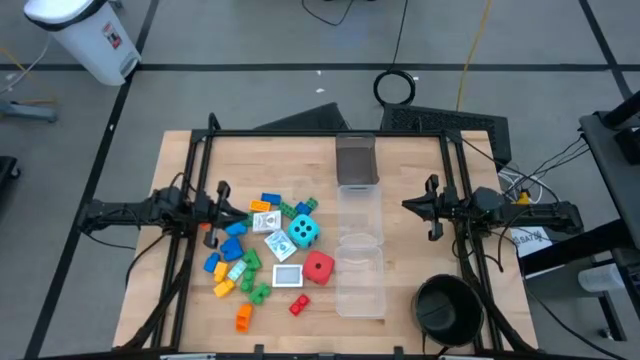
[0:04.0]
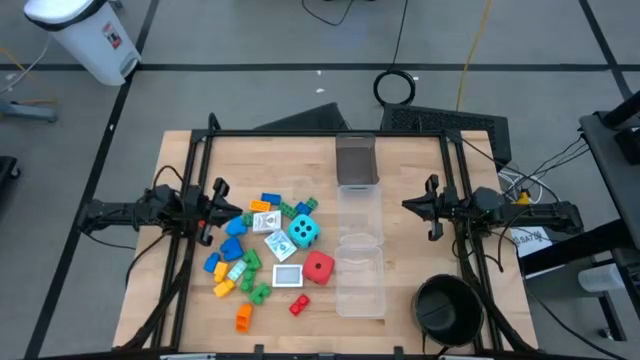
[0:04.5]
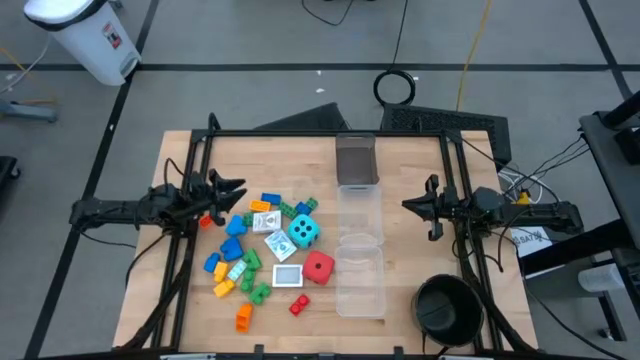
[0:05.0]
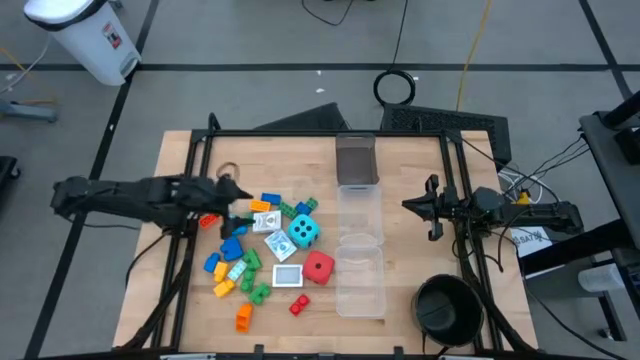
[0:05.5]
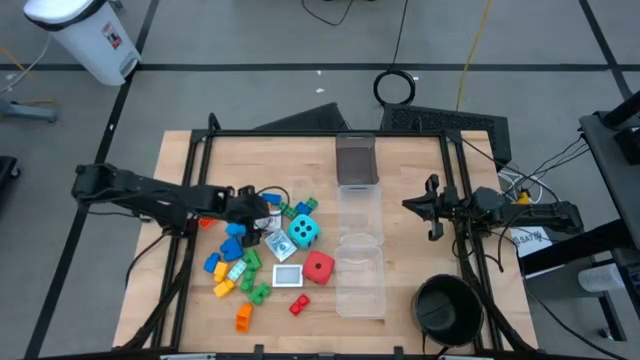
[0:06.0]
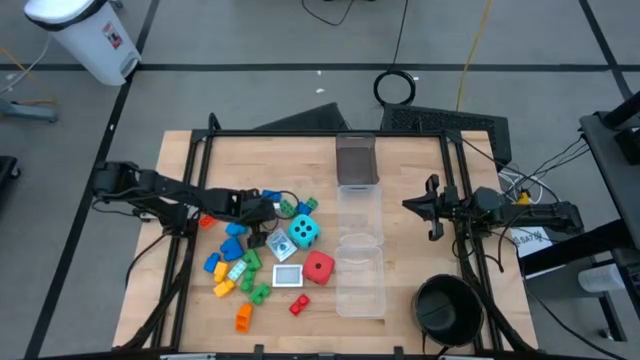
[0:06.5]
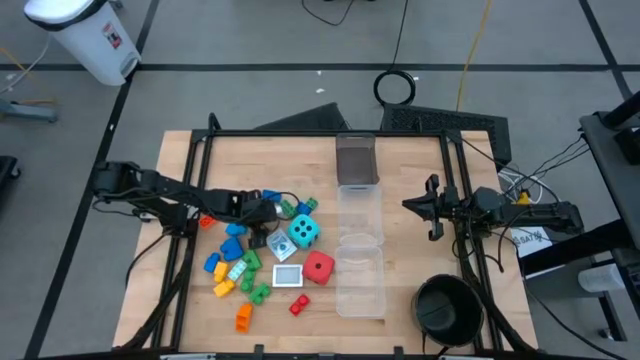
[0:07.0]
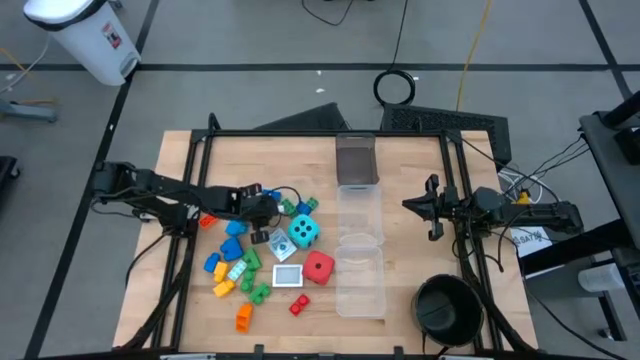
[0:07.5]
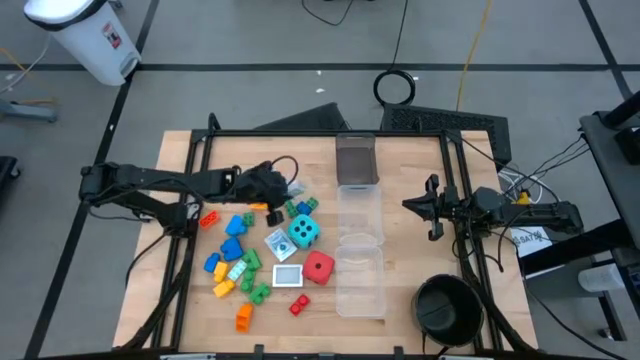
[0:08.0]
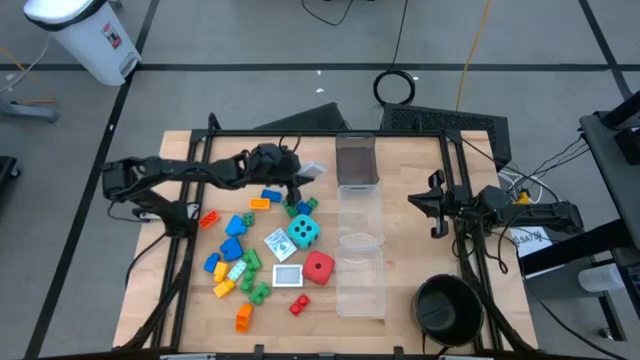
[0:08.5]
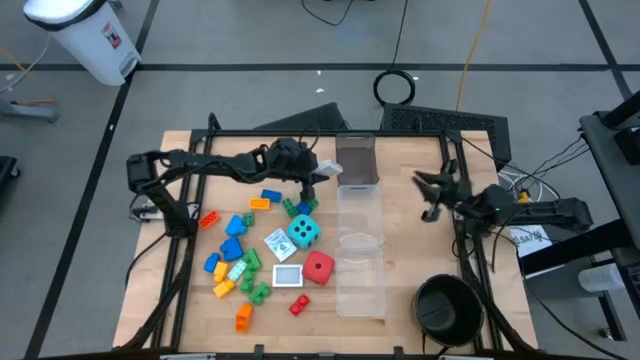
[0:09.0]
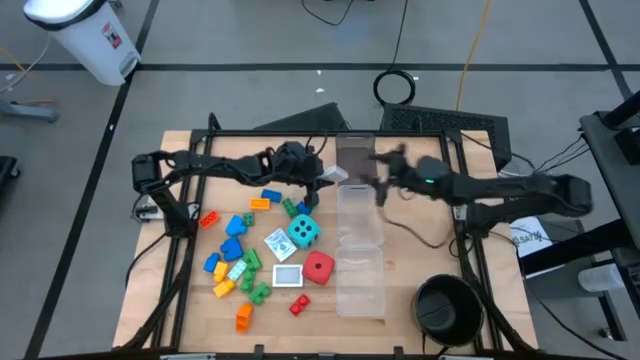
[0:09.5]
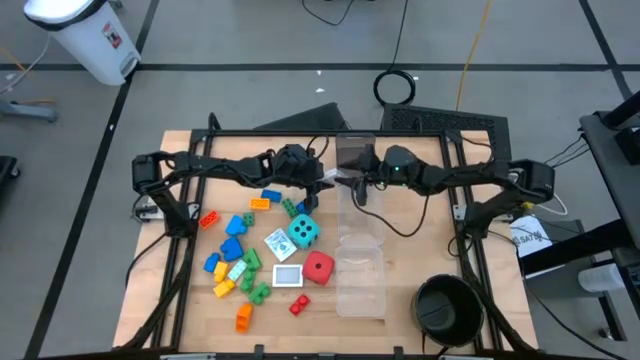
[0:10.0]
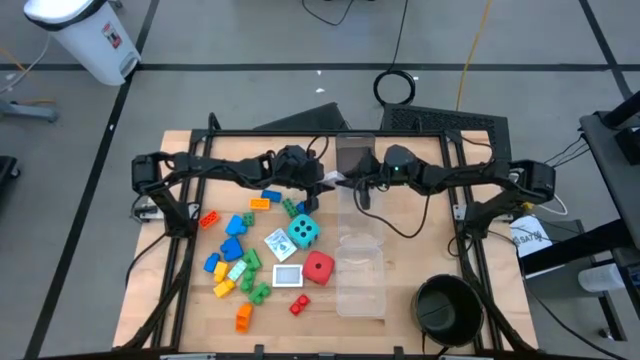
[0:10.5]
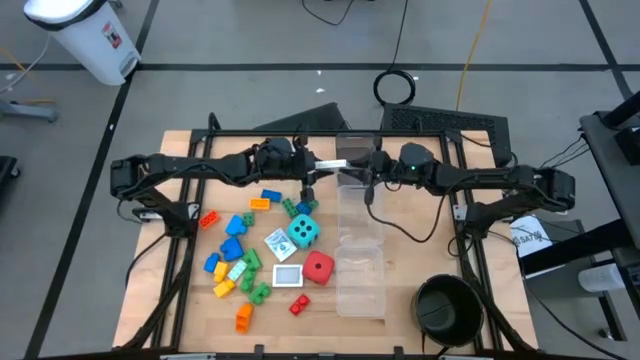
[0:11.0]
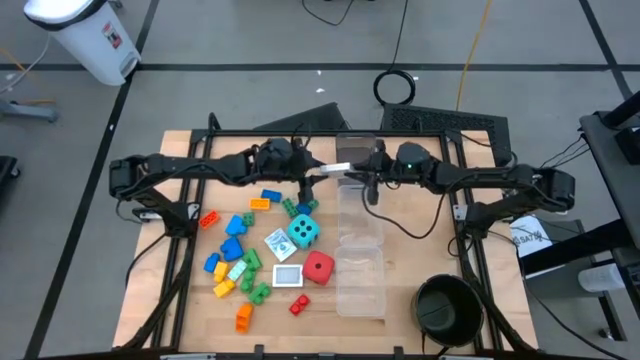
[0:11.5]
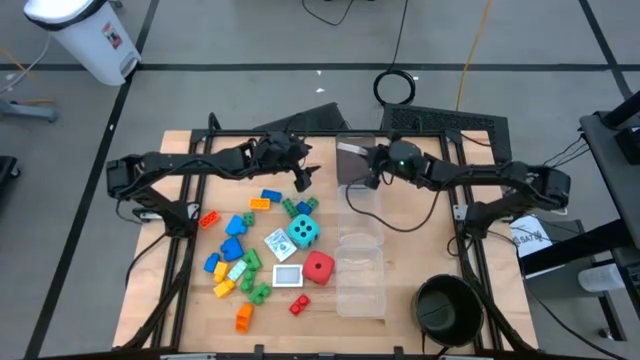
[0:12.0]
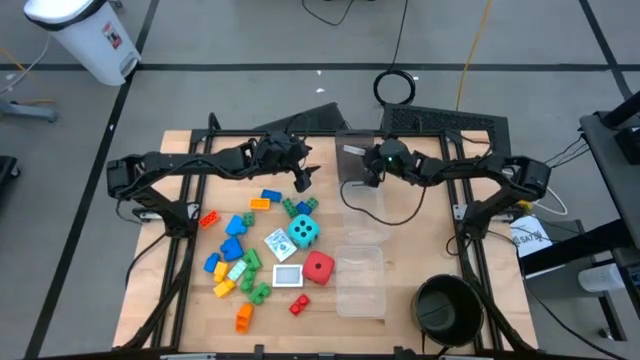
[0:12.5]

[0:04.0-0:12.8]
Task: Pick & Place Toys
Put the playing cards into the top black transparent bin

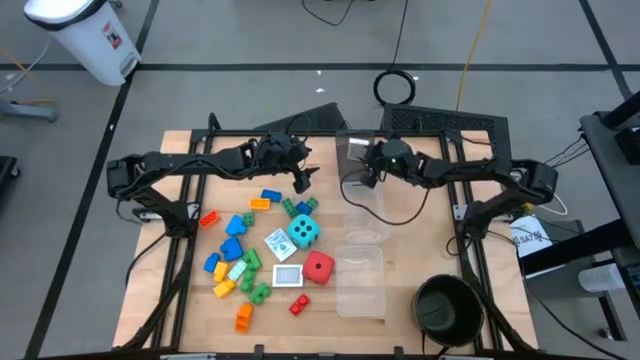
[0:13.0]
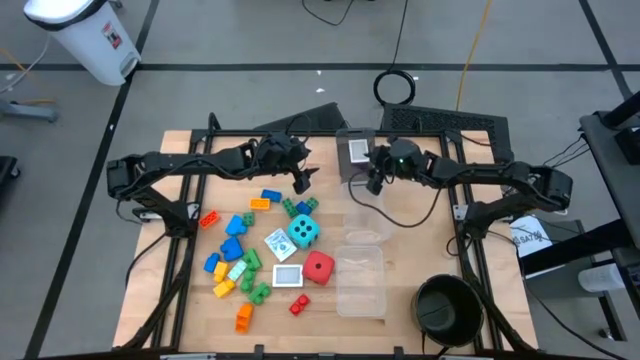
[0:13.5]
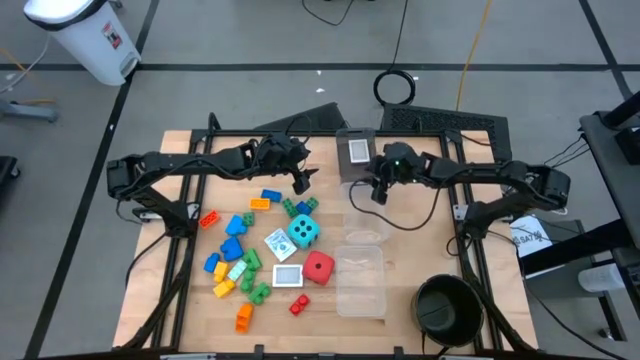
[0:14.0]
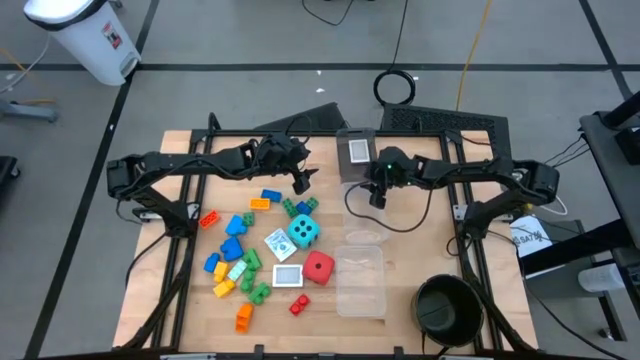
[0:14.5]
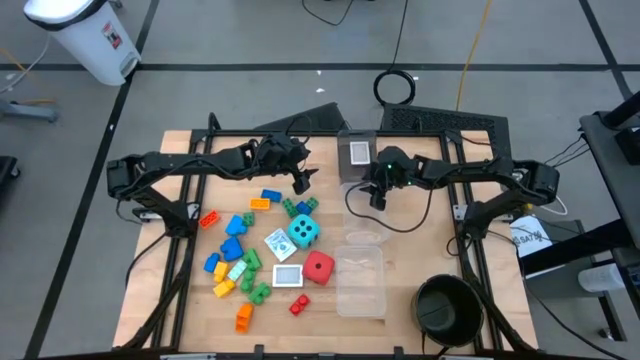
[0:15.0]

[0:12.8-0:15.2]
Adjust the black transparent bin

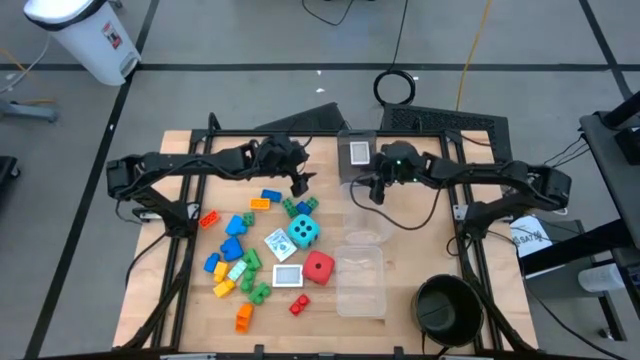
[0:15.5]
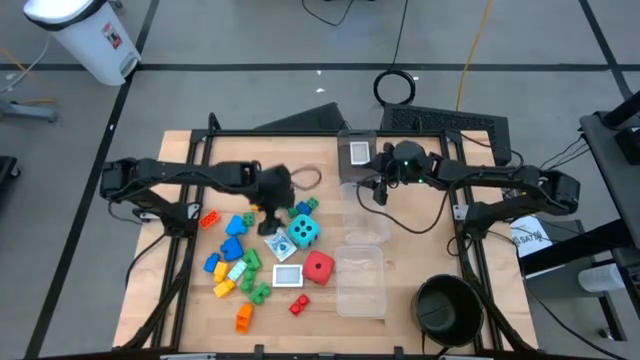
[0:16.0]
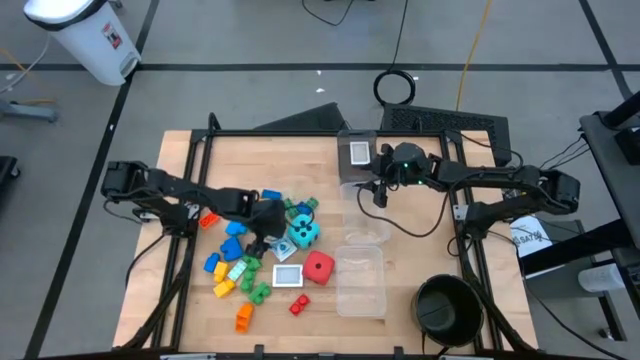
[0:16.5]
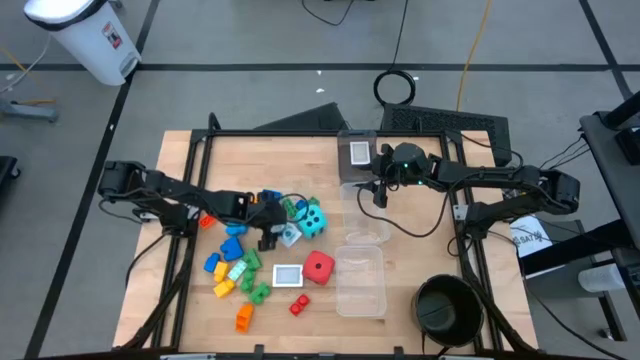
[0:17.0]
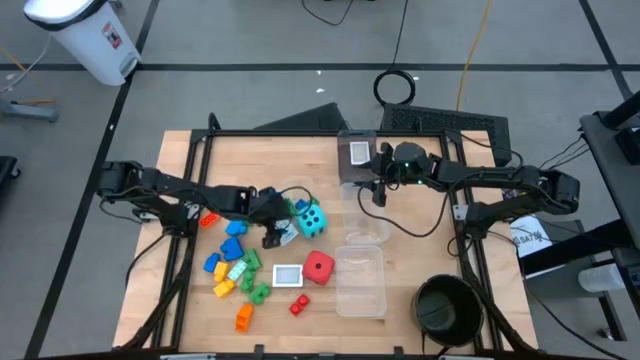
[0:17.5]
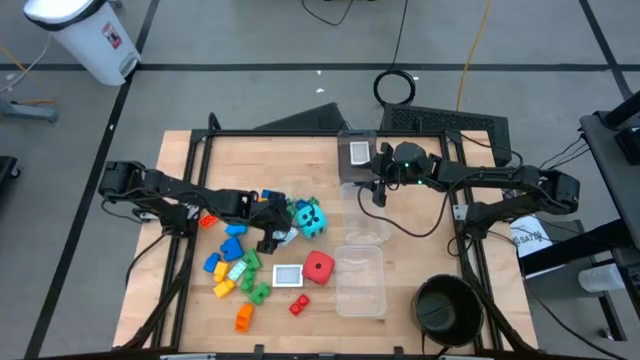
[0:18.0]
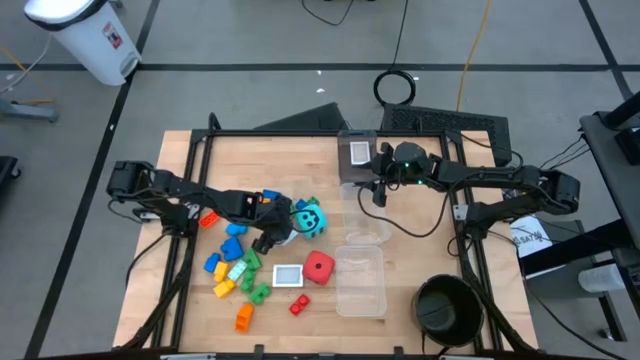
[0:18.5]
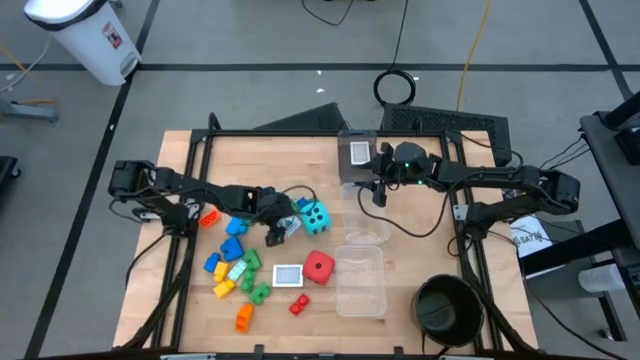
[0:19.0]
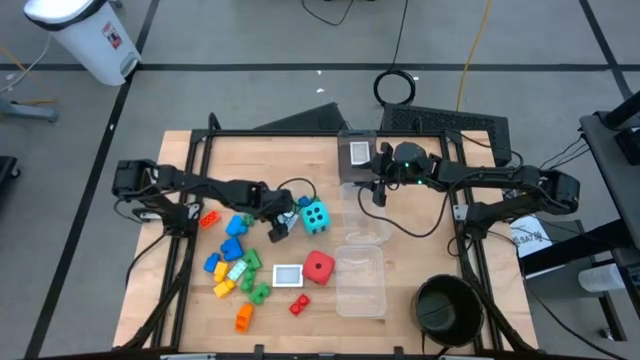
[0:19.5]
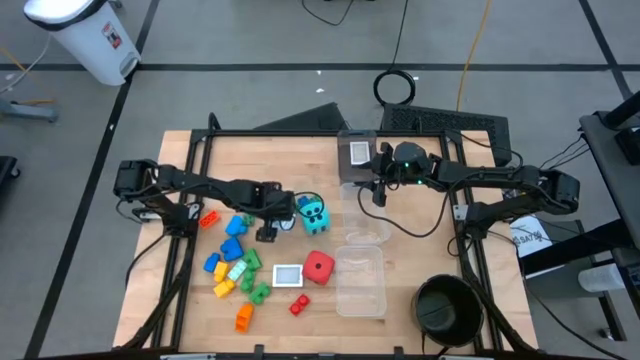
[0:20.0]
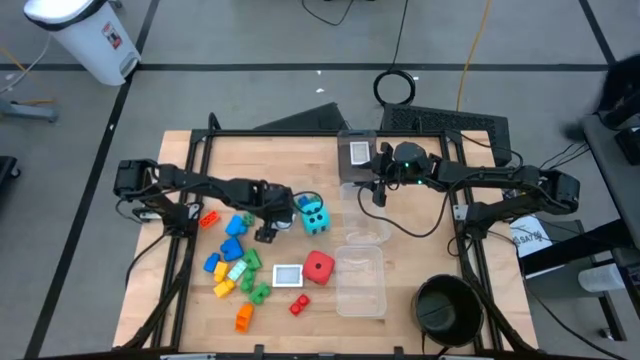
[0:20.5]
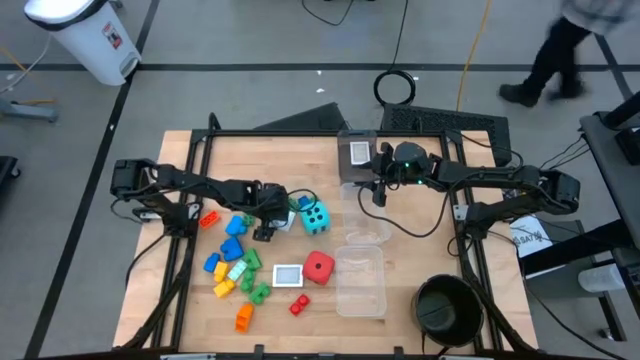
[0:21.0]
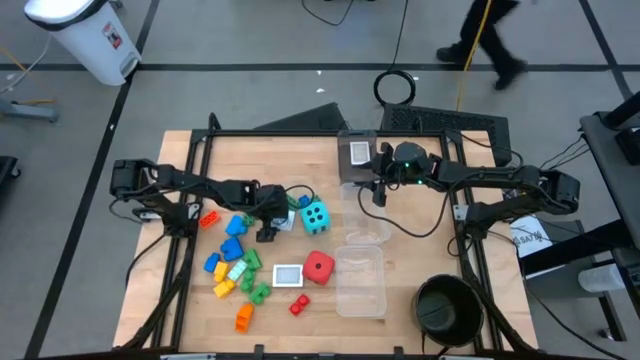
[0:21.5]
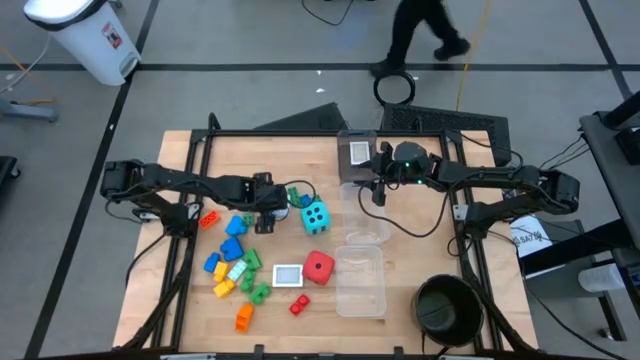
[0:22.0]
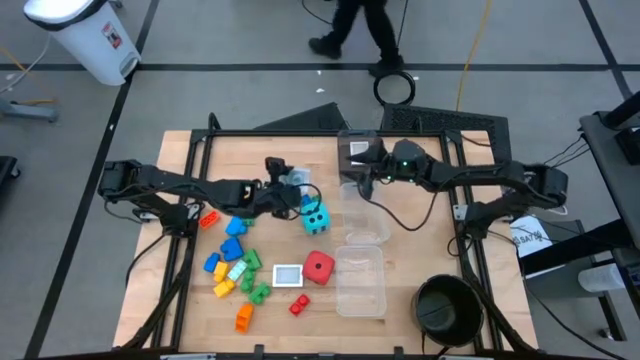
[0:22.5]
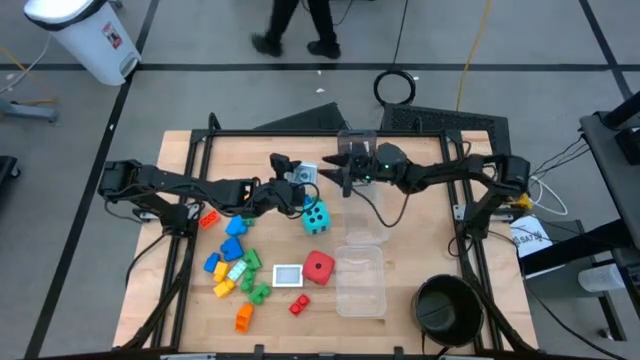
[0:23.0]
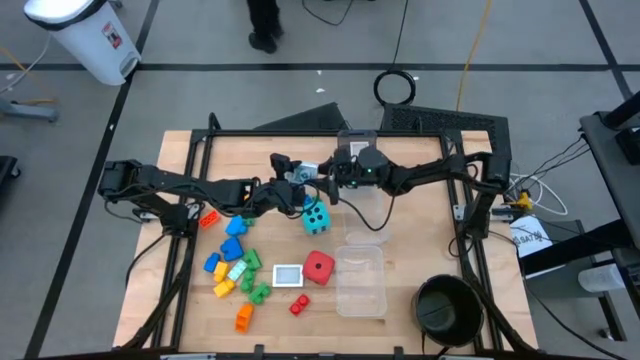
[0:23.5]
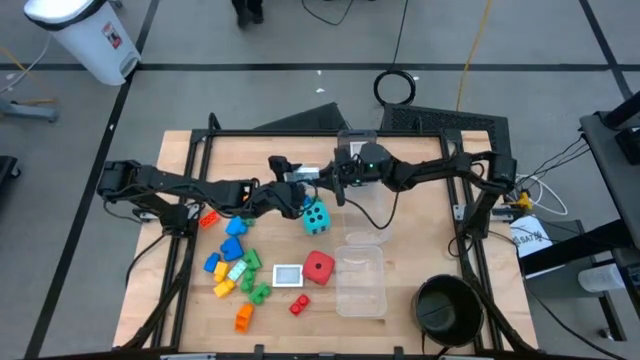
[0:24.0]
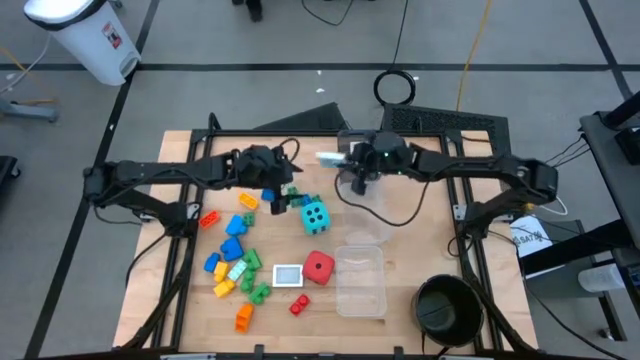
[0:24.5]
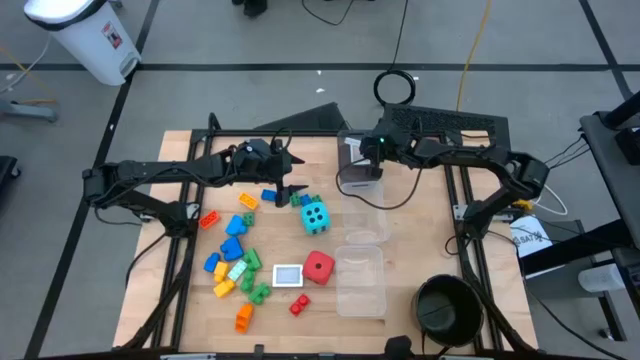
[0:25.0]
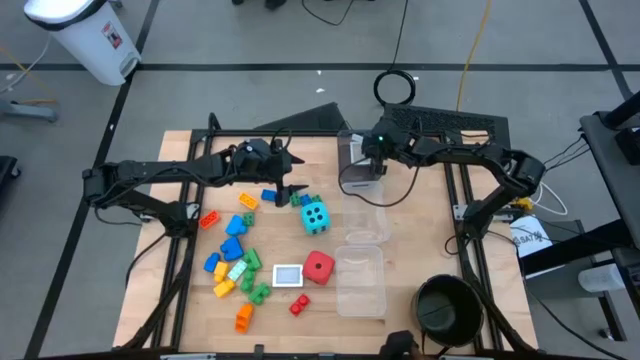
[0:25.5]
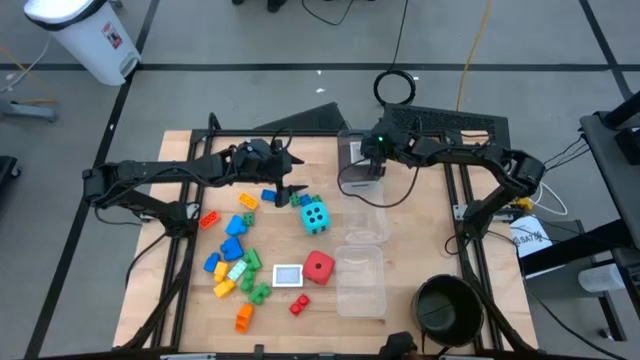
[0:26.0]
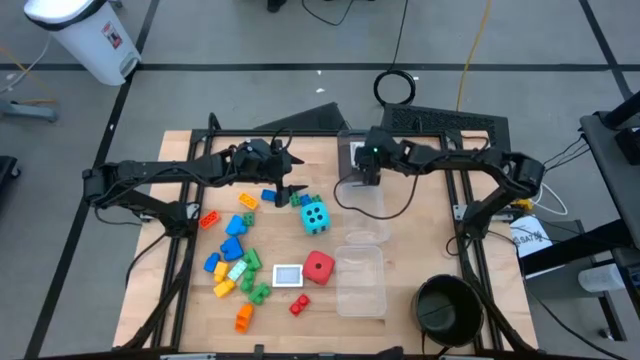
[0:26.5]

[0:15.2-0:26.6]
Put the playing cards into the top black bin
